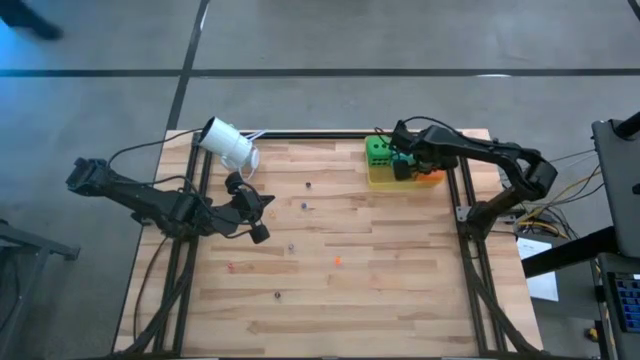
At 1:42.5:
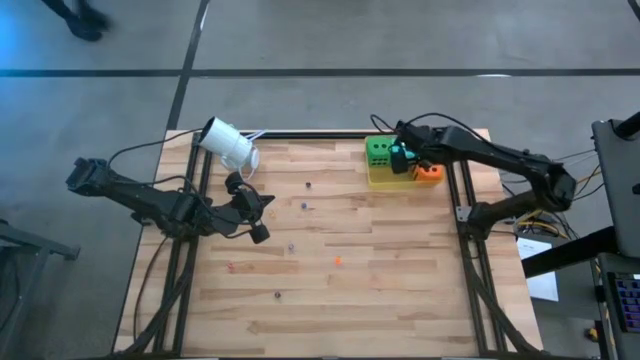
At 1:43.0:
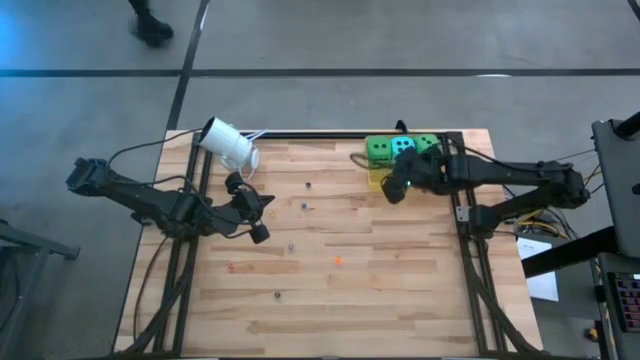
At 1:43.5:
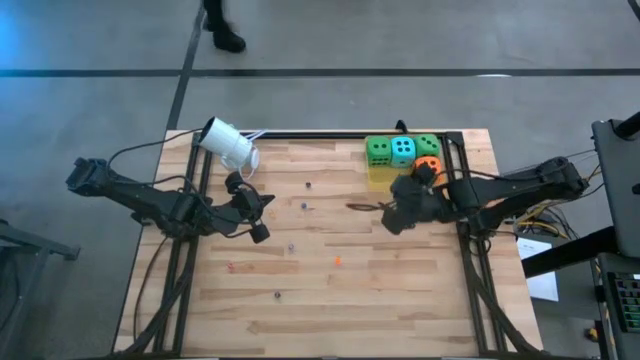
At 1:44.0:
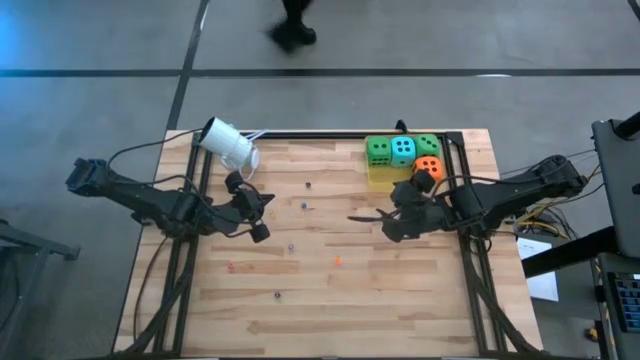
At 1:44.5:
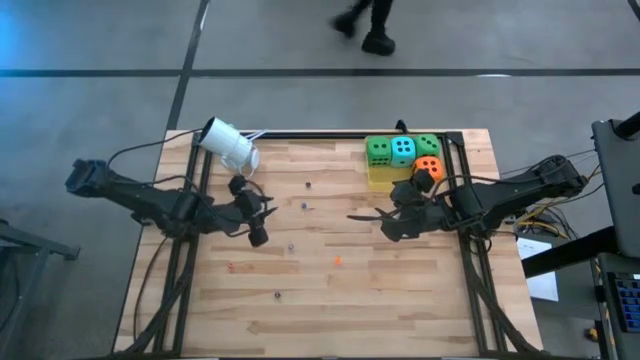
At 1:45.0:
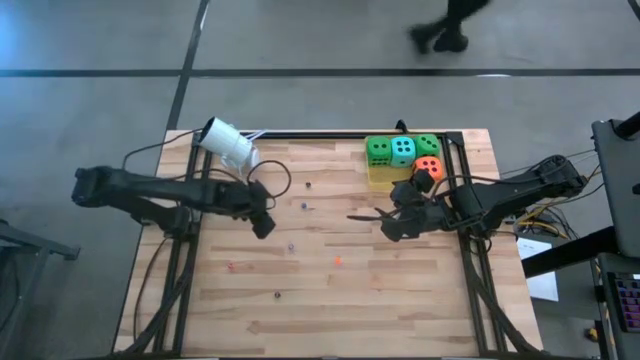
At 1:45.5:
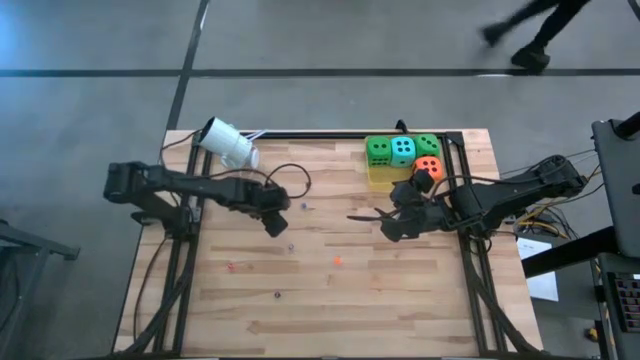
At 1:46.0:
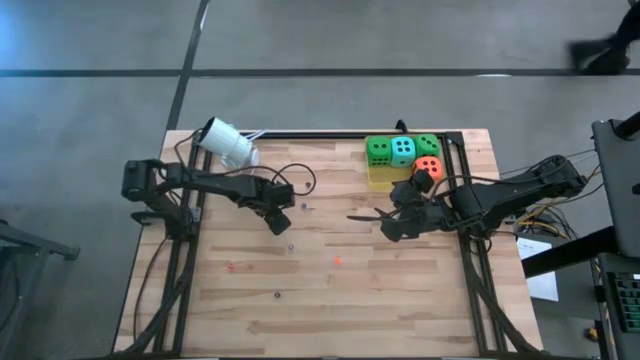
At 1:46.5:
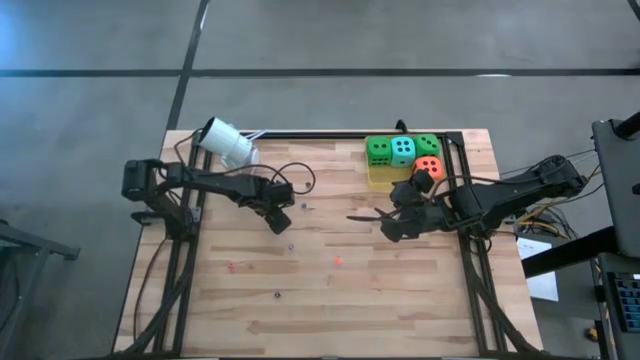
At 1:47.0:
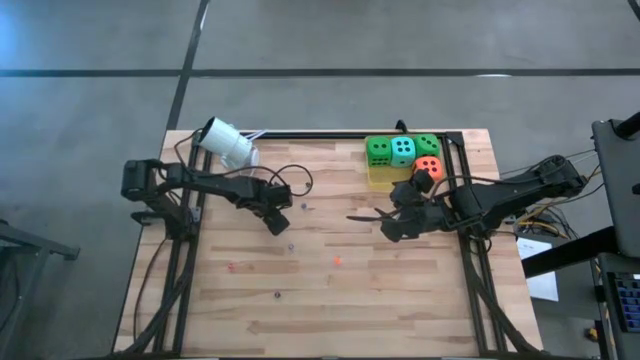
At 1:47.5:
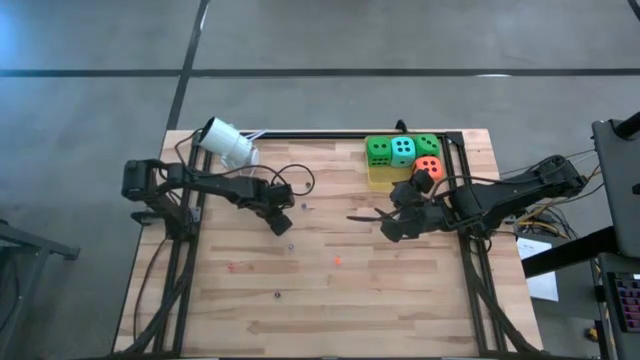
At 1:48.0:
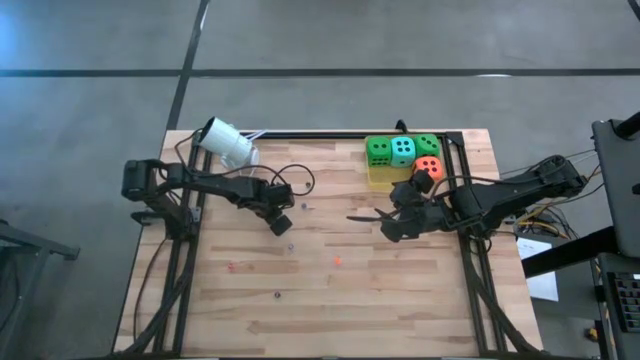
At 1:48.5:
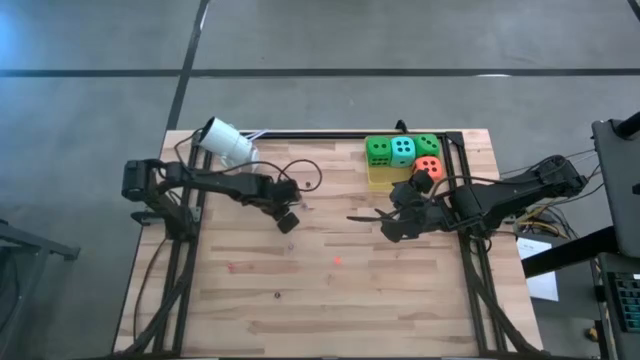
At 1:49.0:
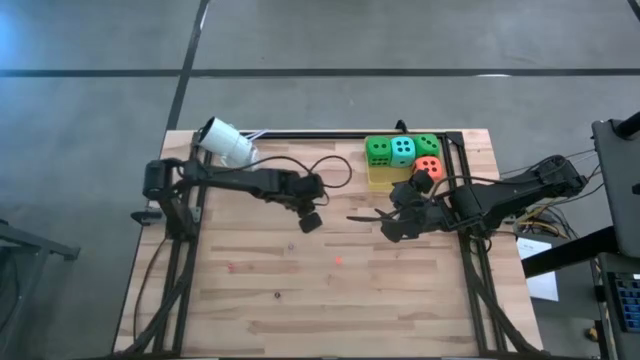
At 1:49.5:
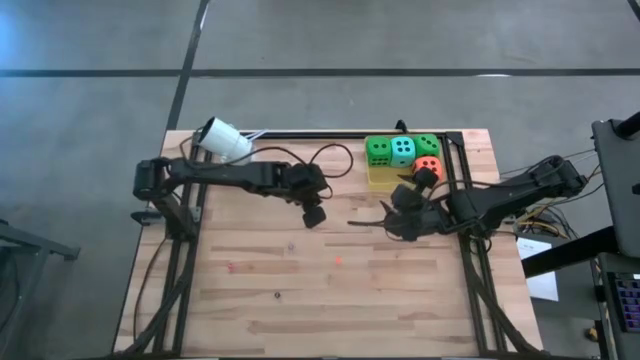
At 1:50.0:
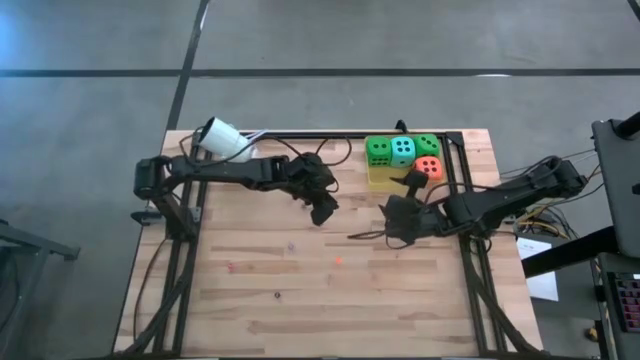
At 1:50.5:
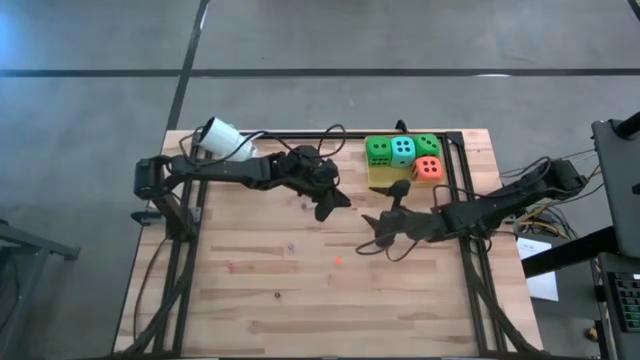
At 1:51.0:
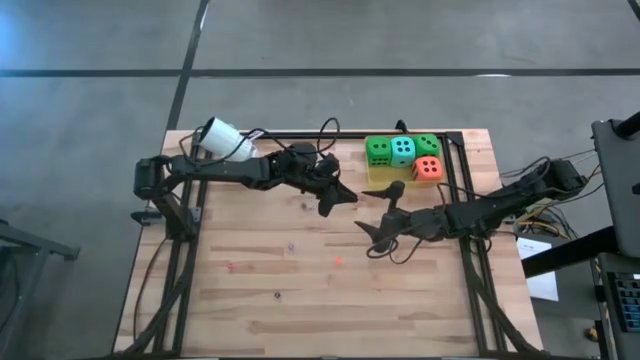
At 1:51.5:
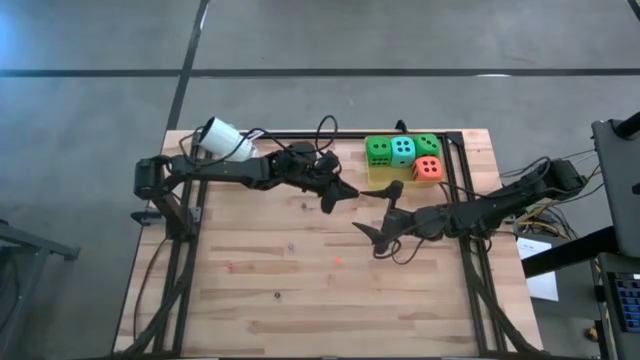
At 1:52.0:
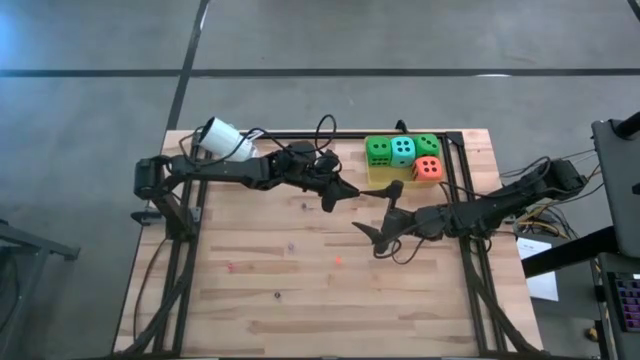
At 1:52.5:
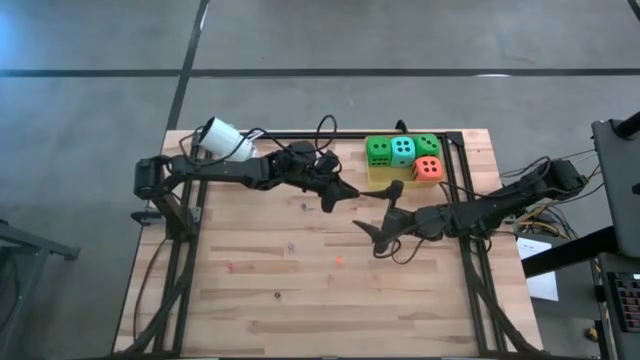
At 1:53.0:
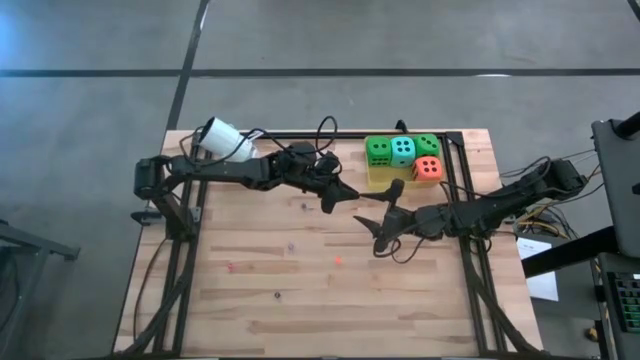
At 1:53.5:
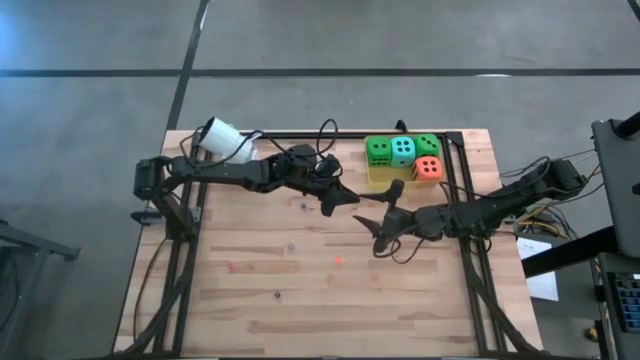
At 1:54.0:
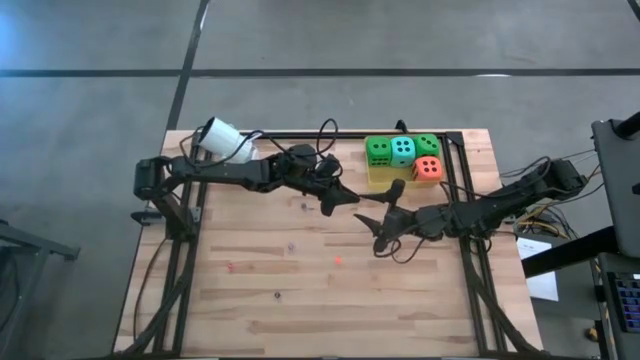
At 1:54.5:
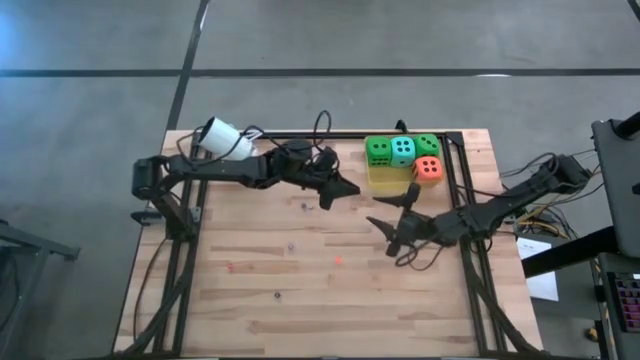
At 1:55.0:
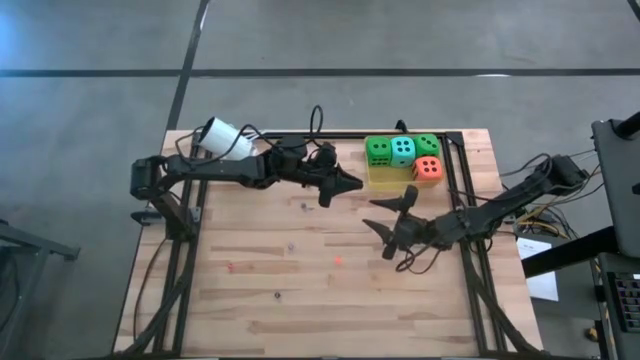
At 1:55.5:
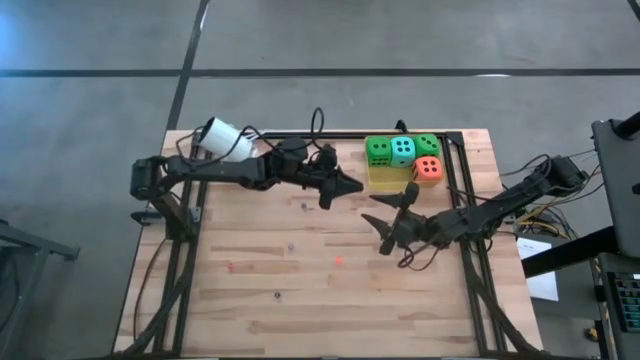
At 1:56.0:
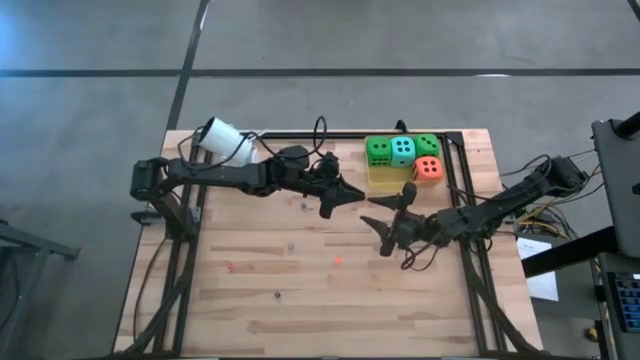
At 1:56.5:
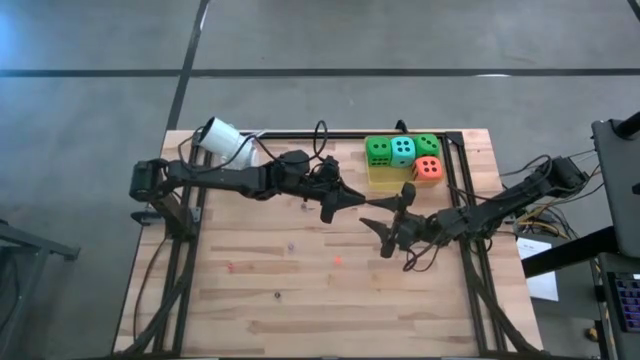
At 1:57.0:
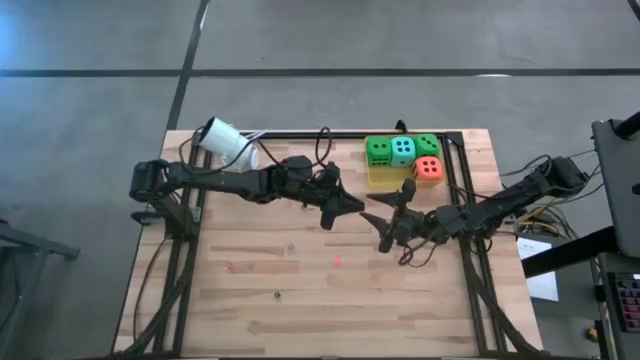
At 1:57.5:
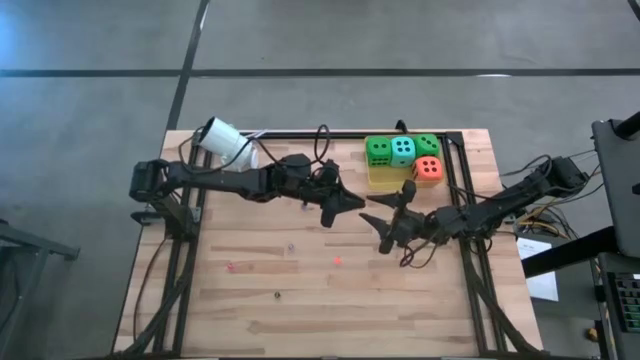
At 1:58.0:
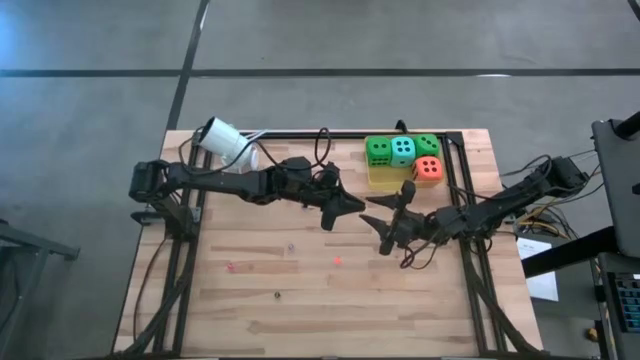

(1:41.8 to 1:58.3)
Task: Pick & Place Dice
Put the small yellow dice into the yellow bin

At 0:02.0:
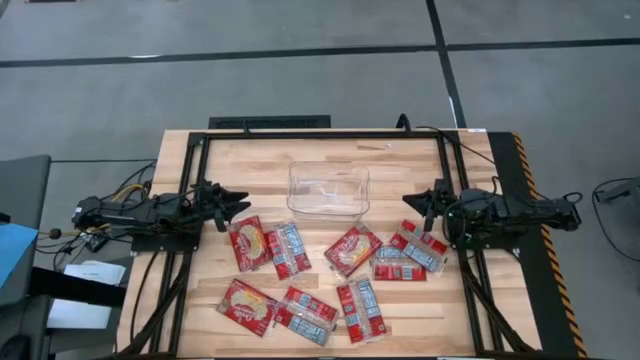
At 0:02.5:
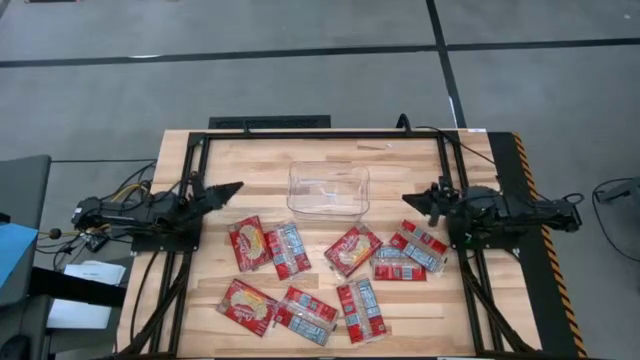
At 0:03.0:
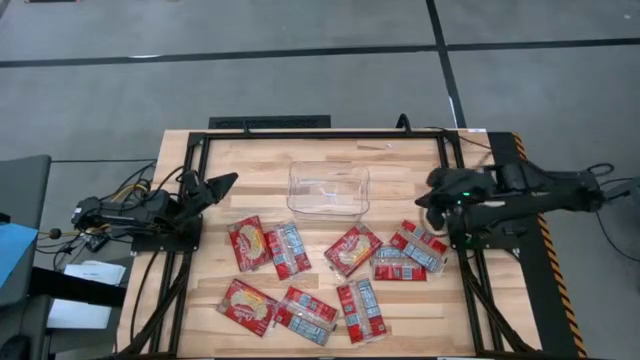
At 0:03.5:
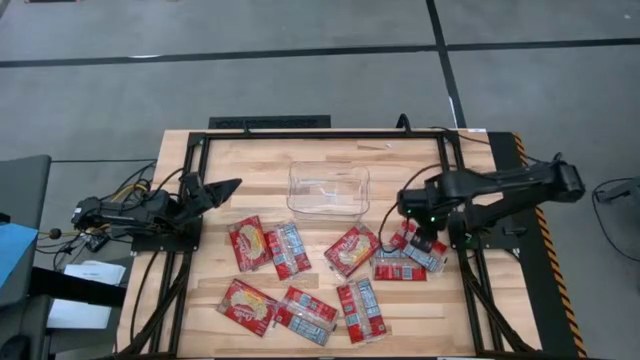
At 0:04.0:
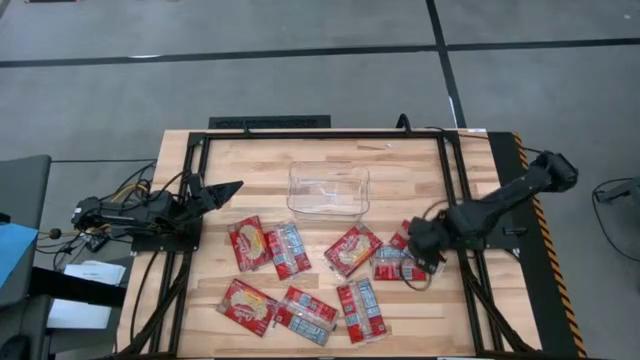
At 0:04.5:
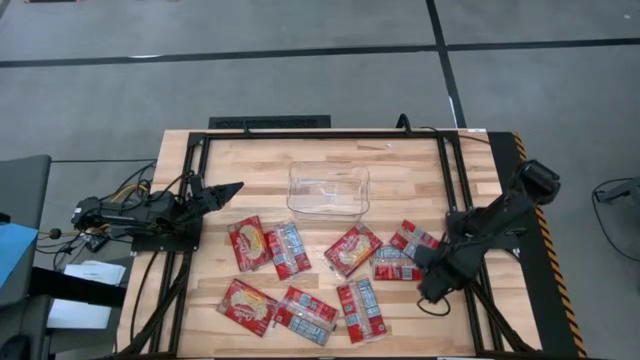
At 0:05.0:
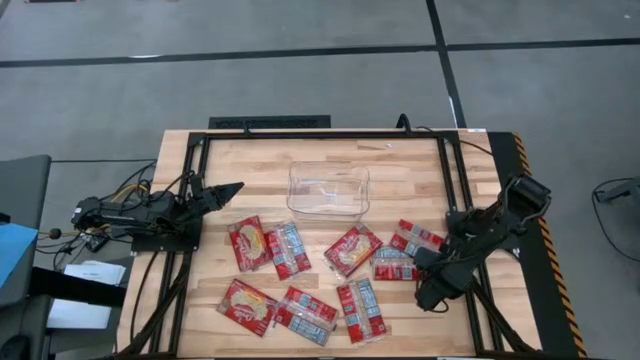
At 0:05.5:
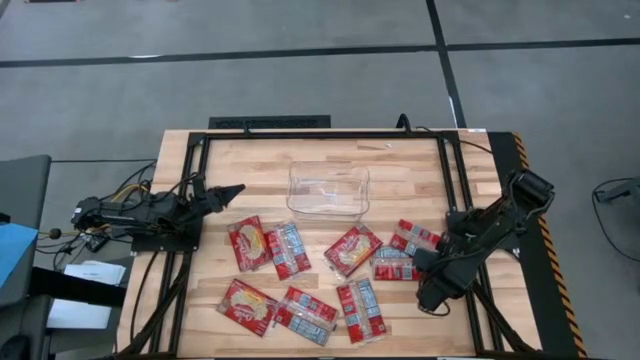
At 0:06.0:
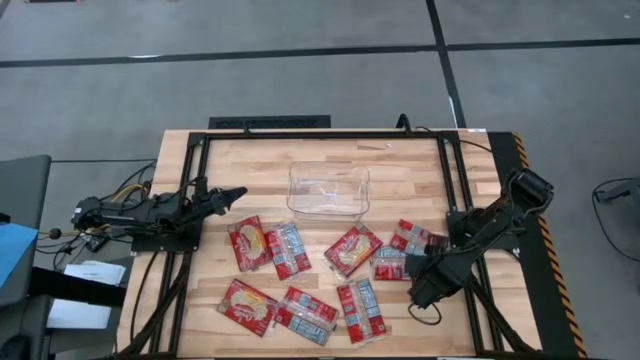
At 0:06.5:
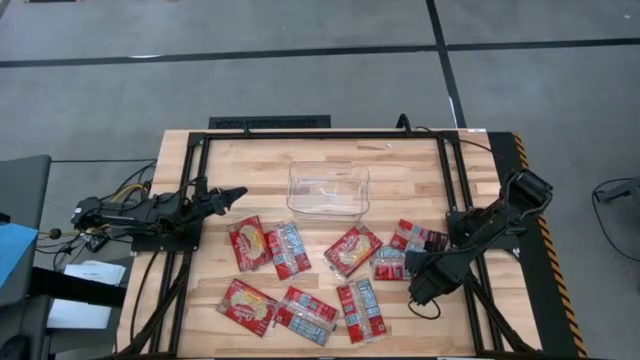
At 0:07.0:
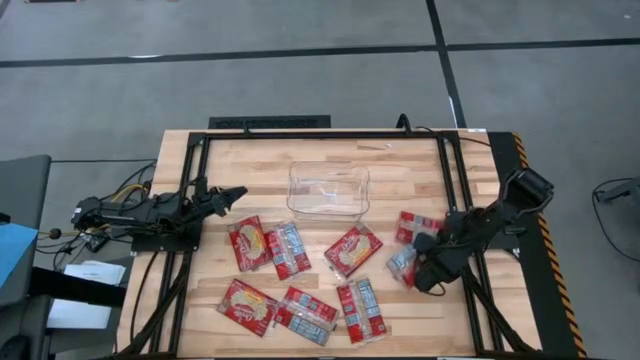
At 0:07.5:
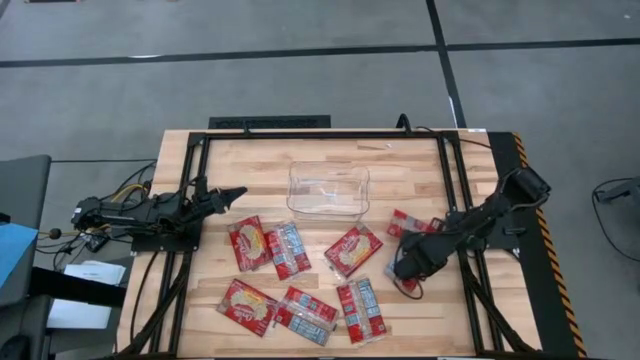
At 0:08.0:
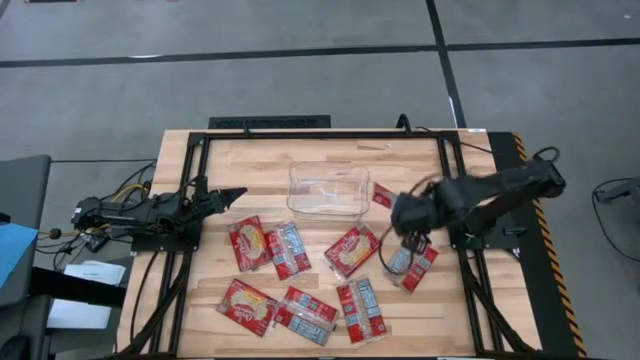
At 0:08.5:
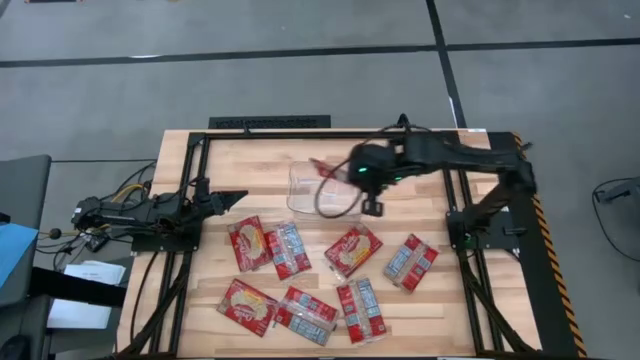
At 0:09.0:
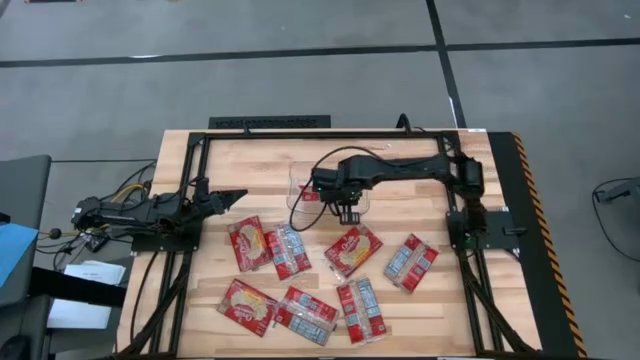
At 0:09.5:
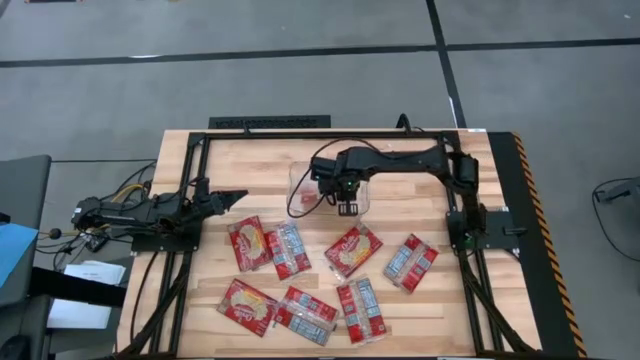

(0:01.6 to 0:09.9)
Task: Sort popcorn bags into baskets
Put the red popcorn bag into the transparent bin
